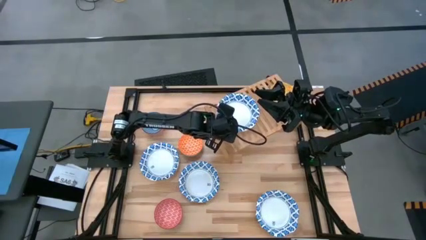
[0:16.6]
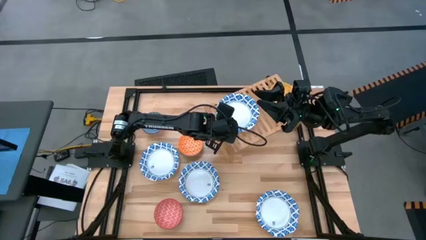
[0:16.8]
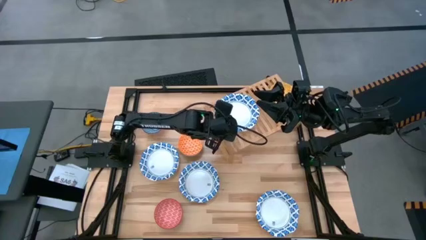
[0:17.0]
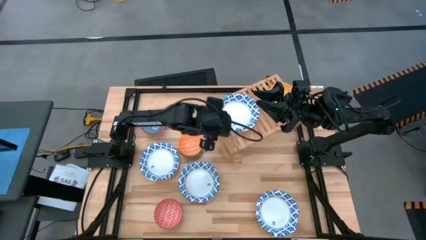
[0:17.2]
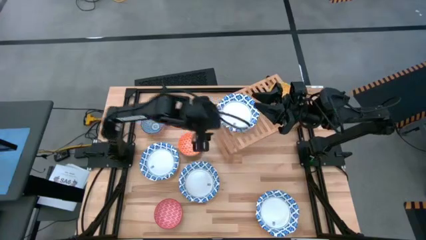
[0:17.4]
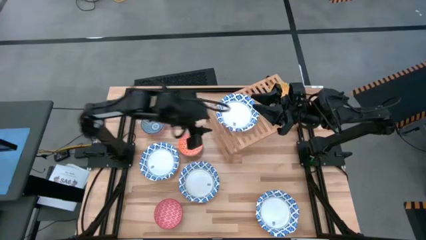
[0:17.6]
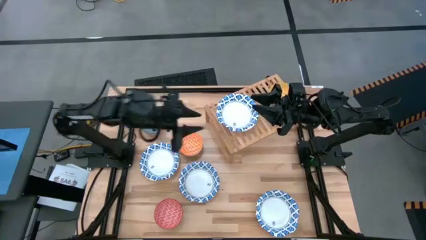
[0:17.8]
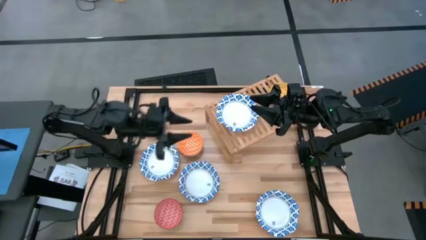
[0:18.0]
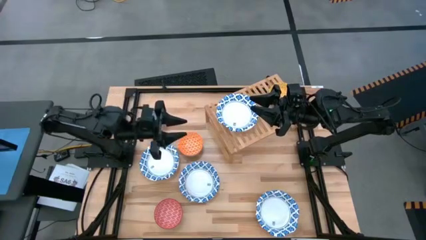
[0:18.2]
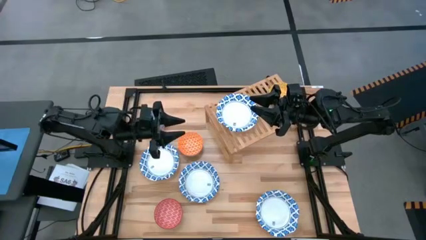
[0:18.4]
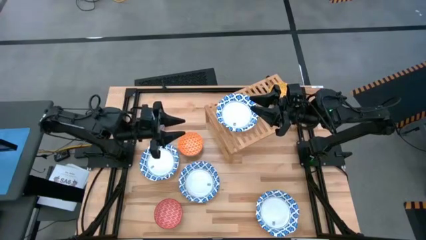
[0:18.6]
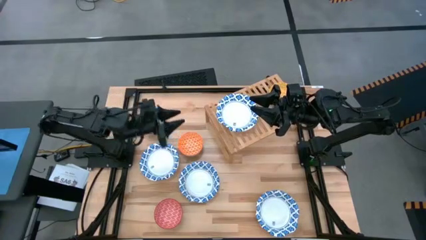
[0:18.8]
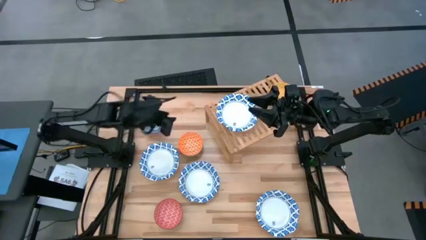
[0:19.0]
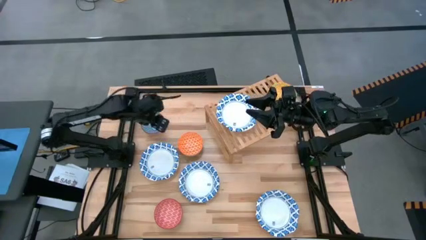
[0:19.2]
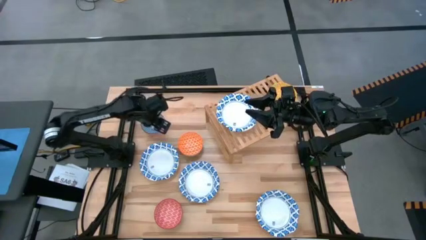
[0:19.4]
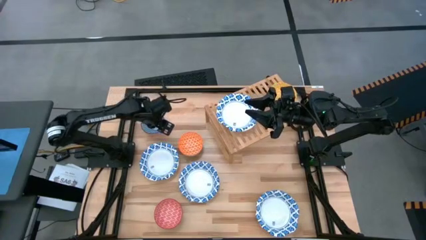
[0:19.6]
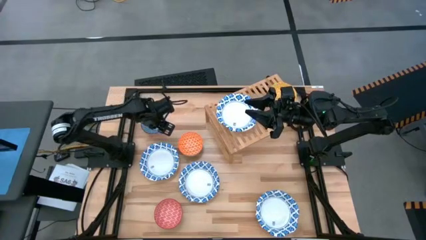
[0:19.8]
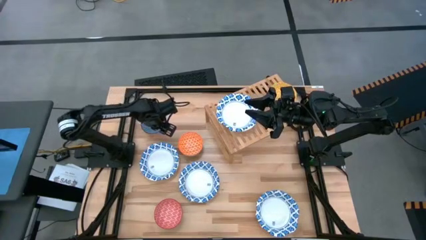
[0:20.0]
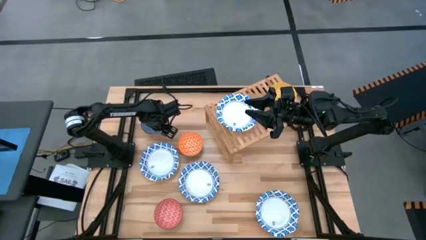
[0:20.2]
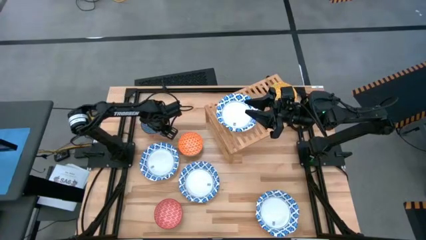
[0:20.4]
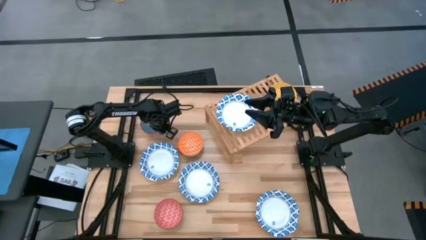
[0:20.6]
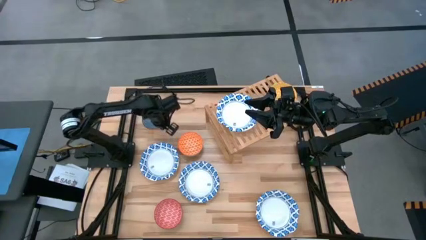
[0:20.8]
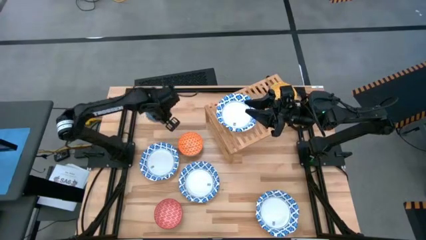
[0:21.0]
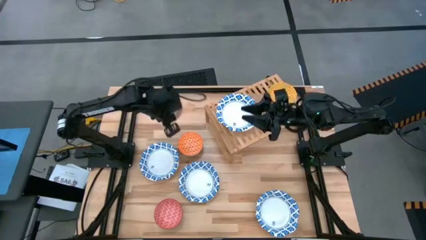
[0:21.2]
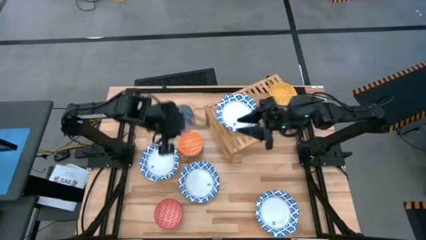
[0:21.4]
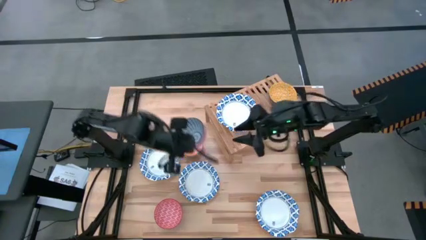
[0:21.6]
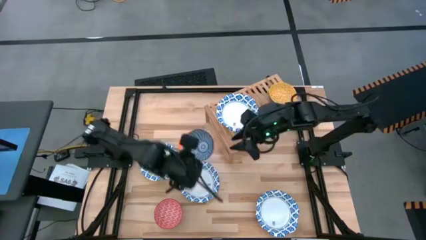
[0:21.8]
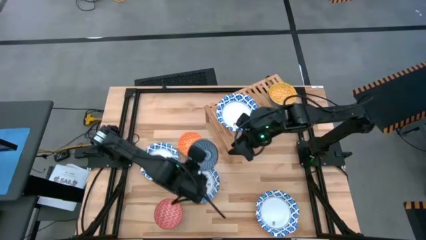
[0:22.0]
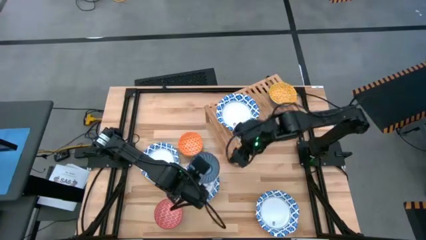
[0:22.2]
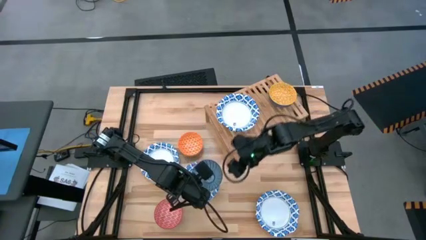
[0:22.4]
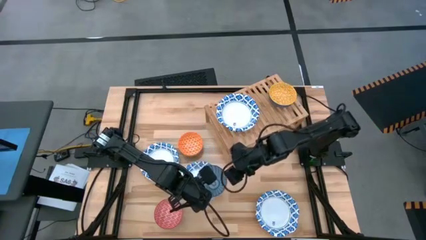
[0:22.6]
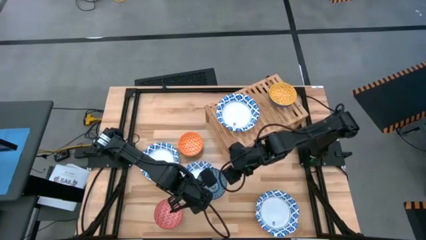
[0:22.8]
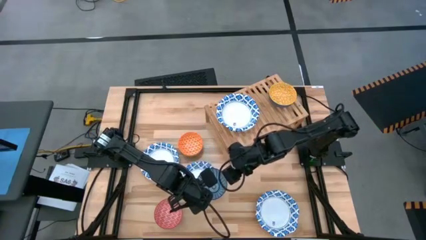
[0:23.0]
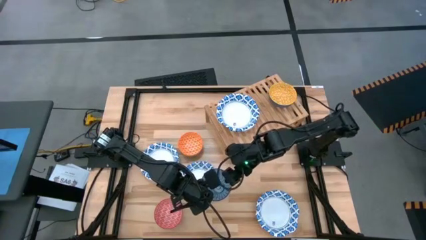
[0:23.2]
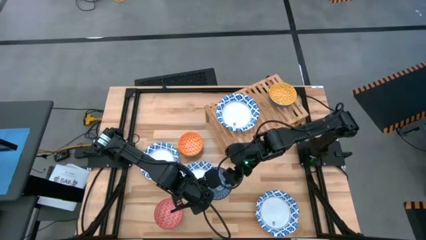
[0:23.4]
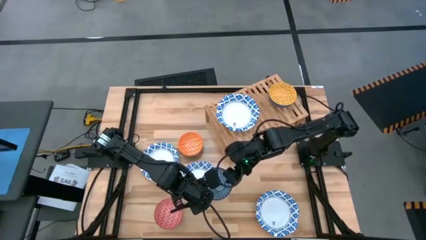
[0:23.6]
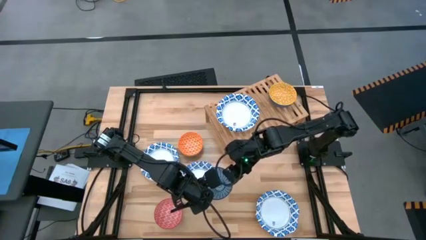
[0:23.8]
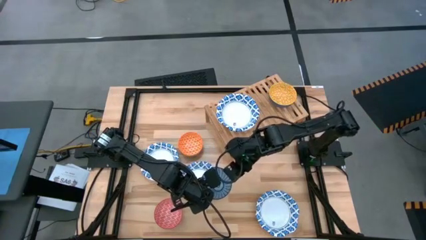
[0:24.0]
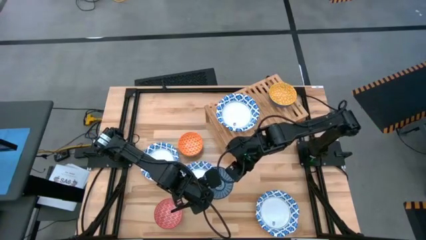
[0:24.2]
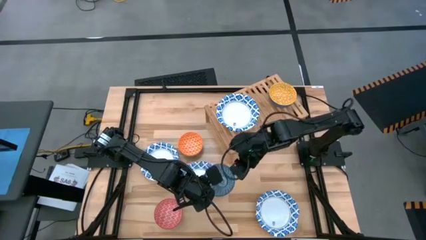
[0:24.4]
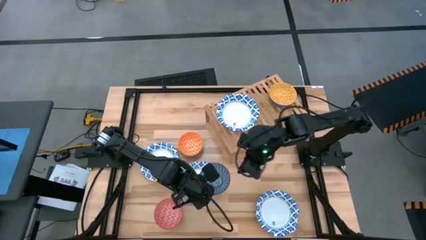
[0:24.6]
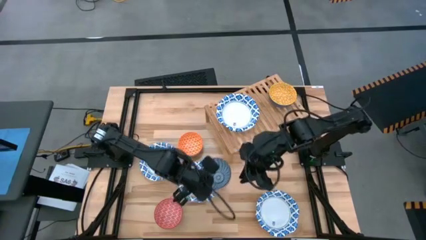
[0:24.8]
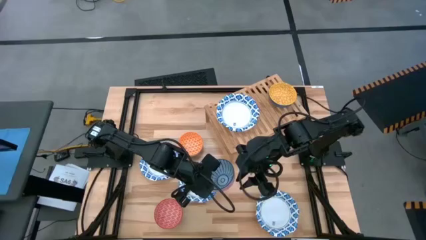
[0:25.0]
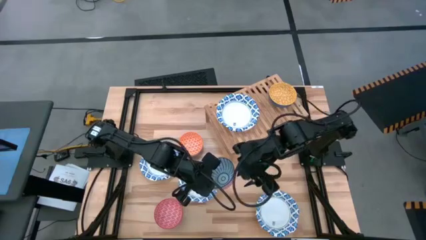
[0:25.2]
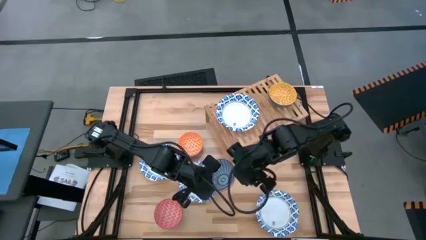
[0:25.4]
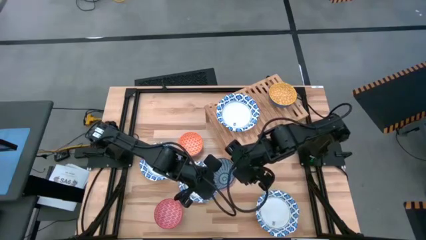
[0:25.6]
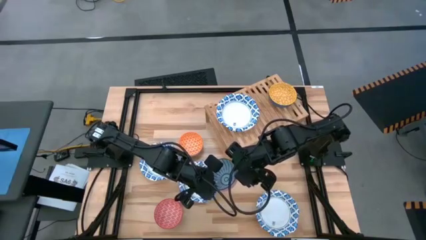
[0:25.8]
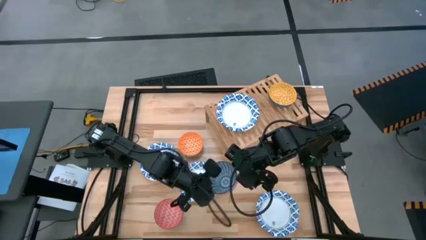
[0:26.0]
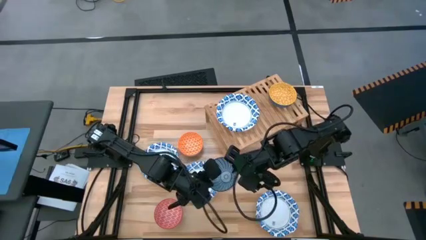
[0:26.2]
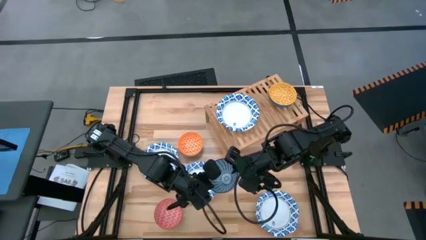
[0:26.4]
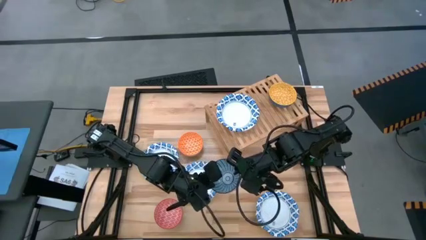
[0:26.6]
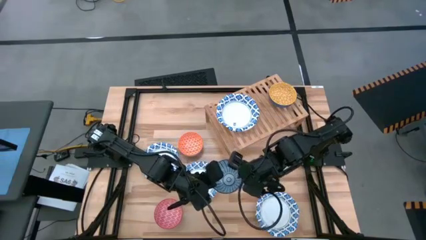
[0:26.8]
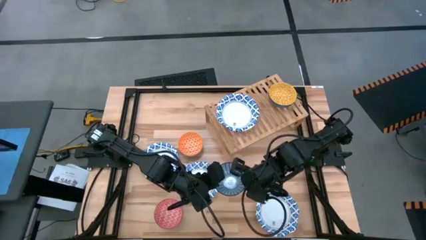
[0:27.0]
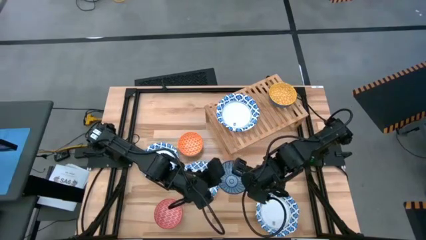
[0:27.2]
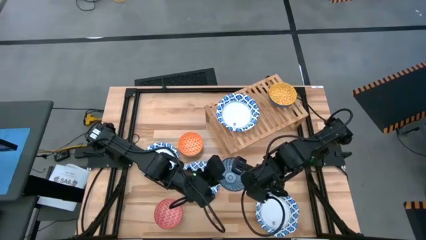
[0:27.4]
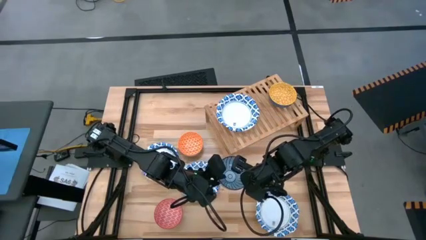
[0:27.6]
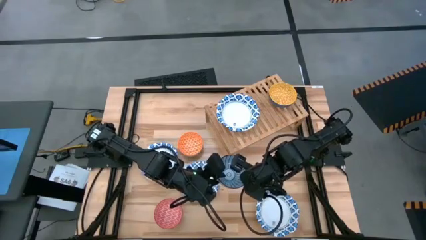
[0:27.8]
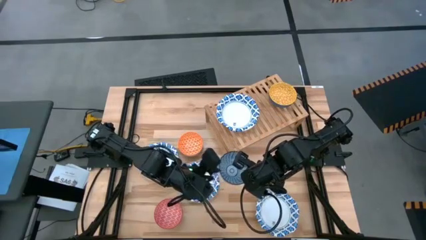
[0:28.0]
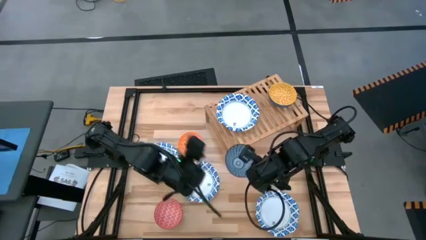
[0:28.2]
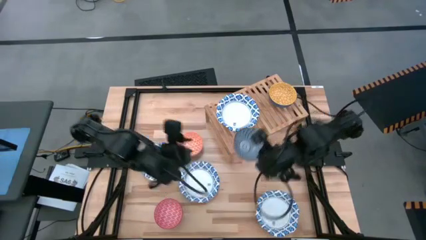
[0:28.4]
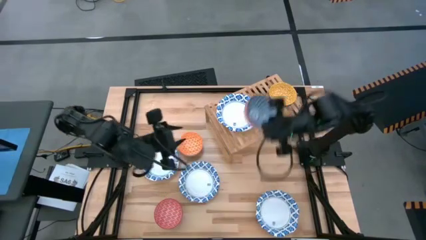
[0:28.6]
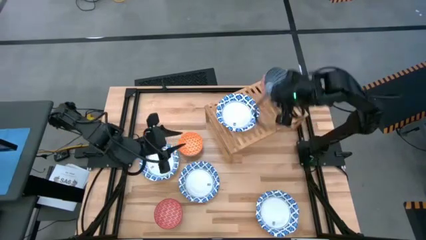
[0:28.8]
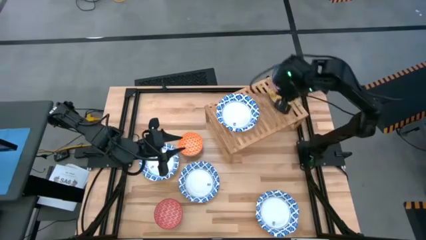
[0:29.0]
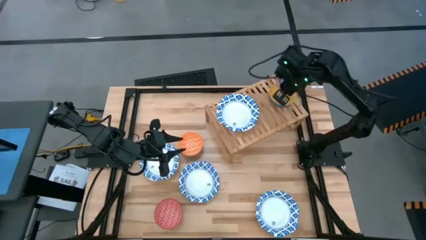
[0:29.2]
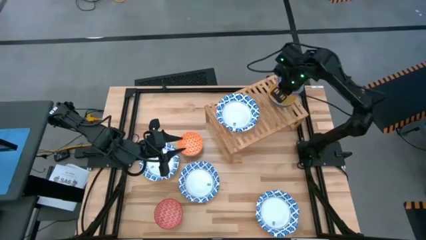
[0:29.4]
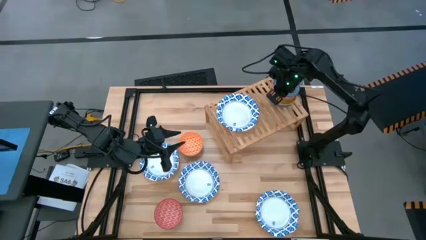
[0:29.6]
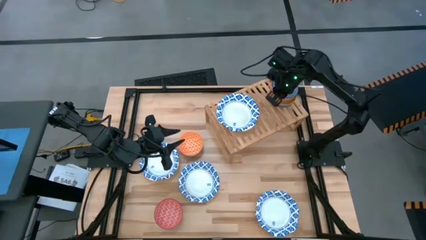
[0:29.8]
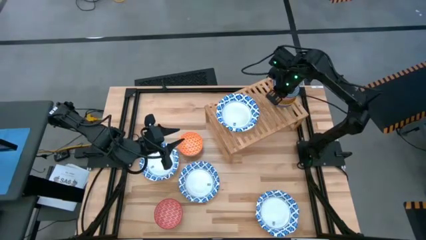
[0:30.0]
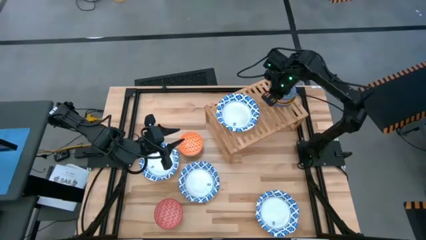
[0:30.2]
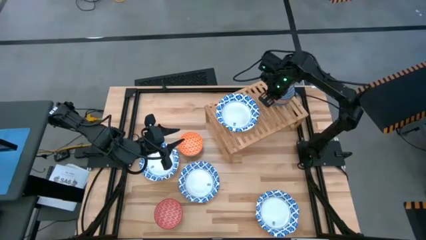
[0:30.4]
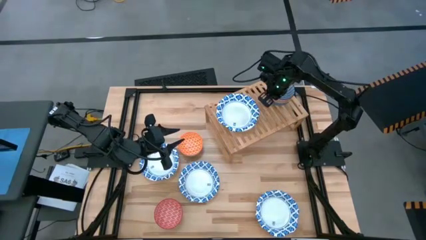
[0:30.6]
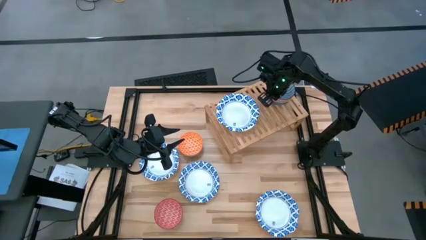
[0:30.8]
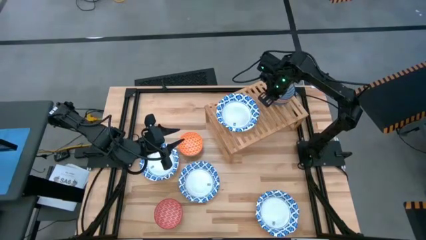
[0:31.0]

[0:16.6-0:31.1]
Task: Place and stack bowls onto a shelf
Stack the blue pattern bowl on top of the yellow pattern bowl on the shelf
